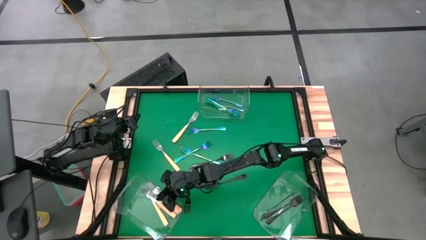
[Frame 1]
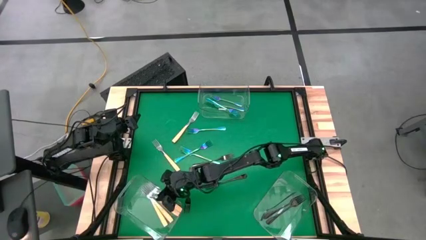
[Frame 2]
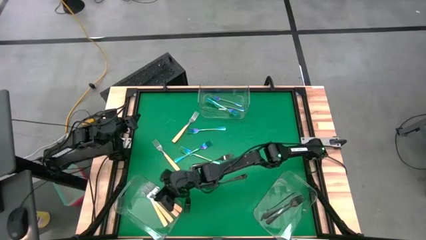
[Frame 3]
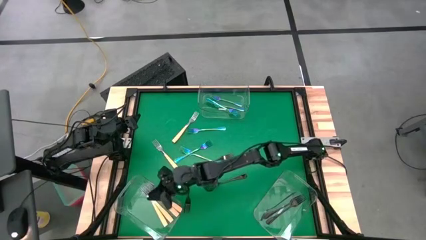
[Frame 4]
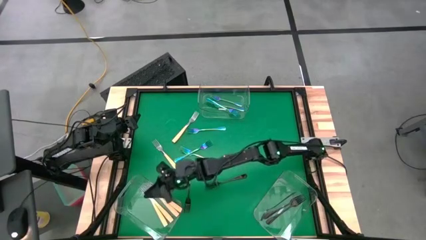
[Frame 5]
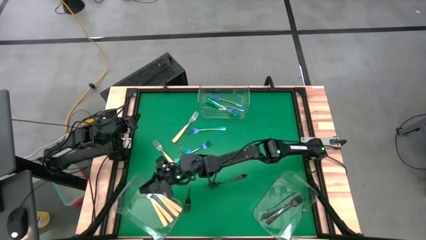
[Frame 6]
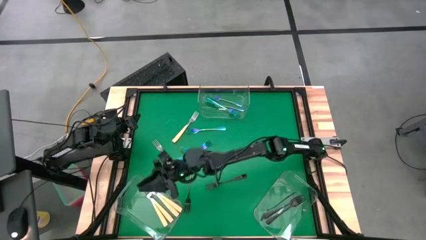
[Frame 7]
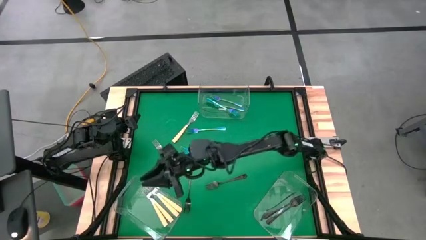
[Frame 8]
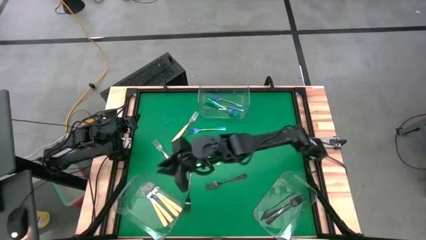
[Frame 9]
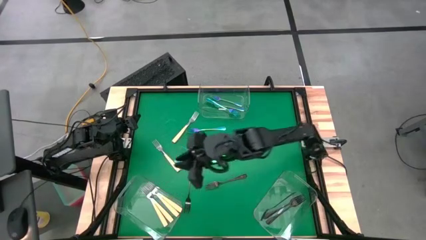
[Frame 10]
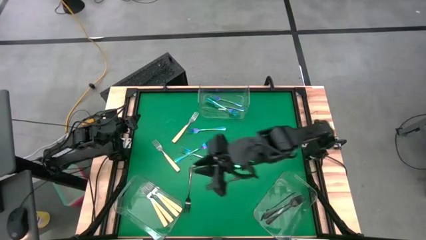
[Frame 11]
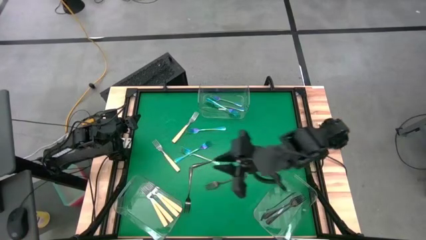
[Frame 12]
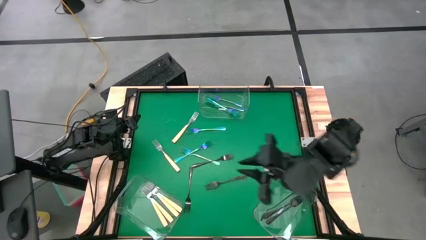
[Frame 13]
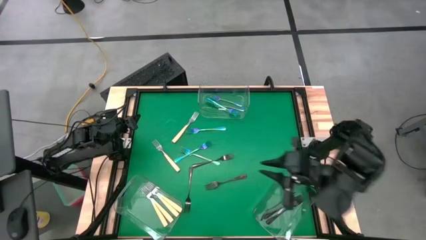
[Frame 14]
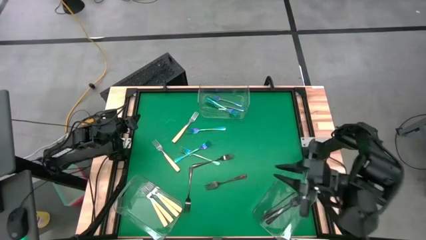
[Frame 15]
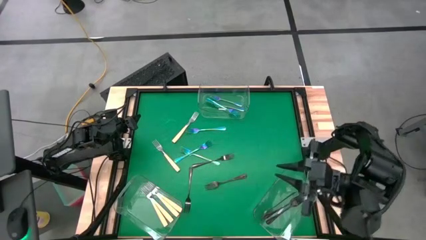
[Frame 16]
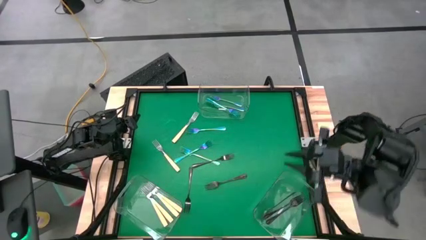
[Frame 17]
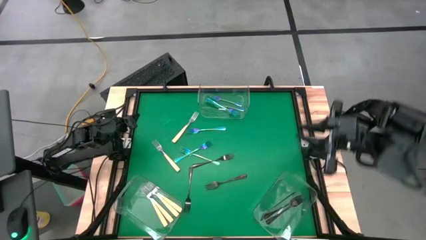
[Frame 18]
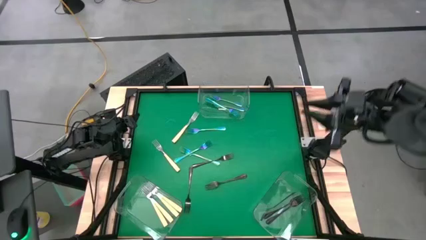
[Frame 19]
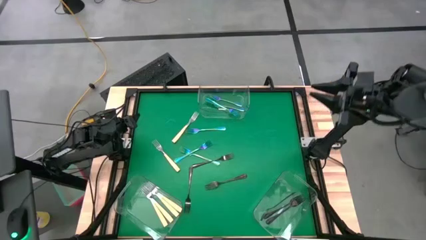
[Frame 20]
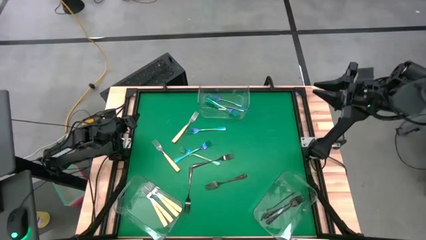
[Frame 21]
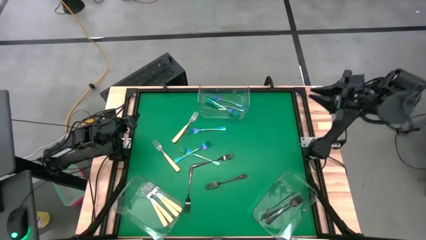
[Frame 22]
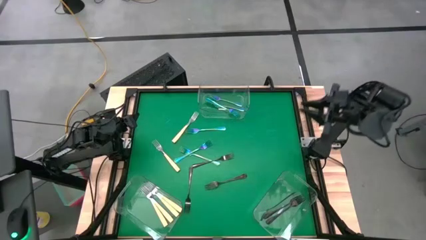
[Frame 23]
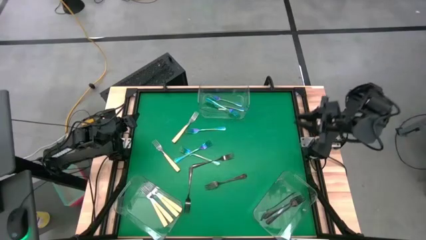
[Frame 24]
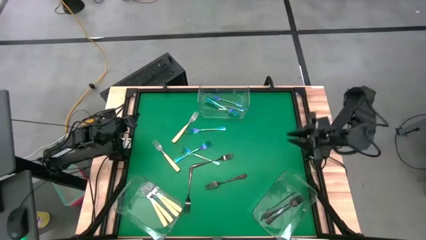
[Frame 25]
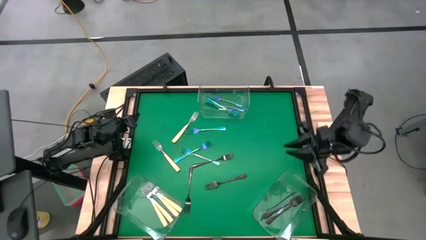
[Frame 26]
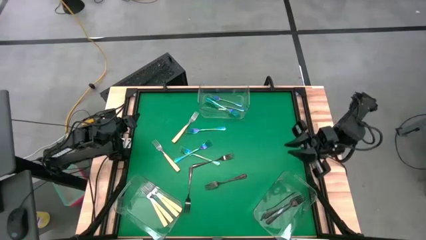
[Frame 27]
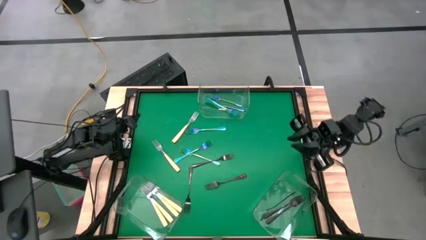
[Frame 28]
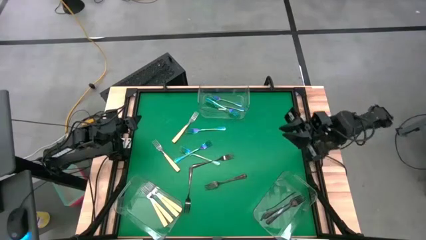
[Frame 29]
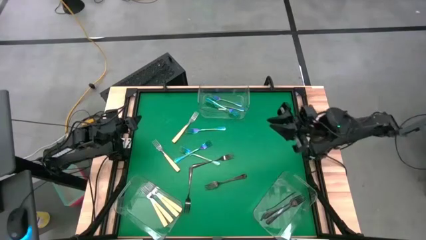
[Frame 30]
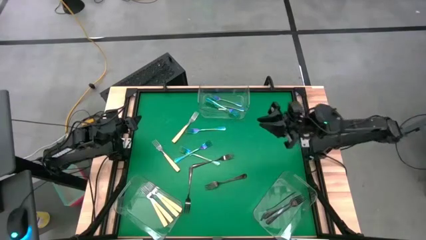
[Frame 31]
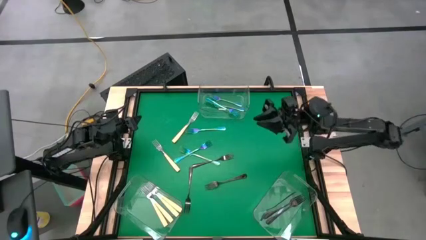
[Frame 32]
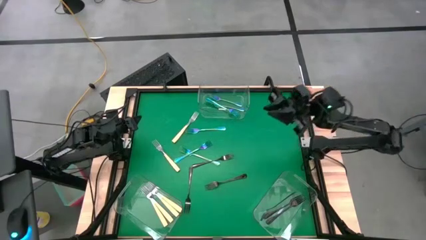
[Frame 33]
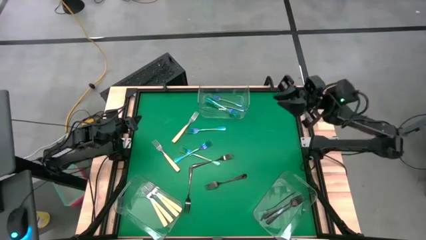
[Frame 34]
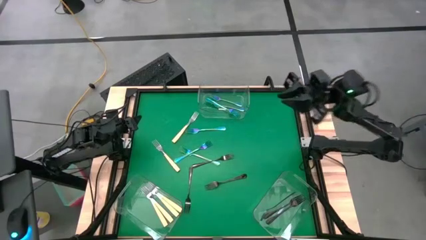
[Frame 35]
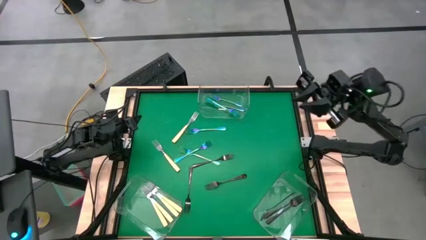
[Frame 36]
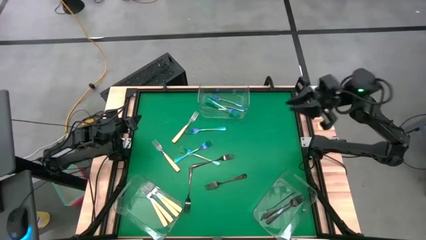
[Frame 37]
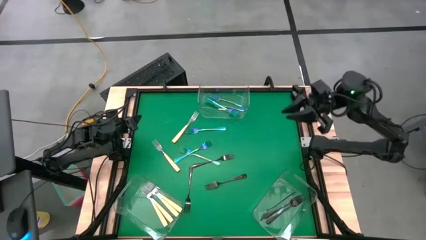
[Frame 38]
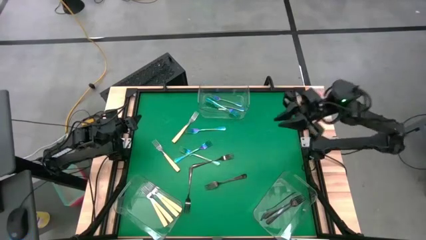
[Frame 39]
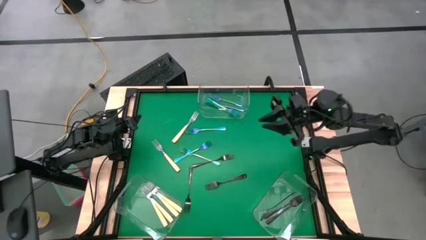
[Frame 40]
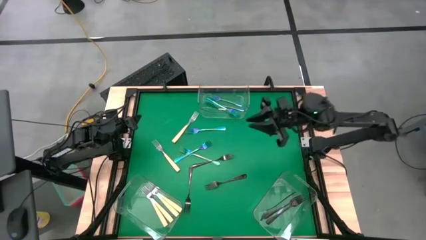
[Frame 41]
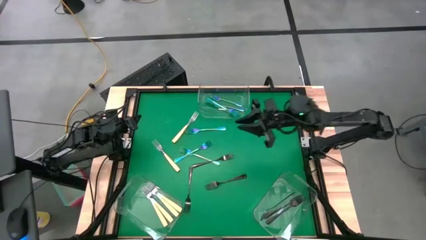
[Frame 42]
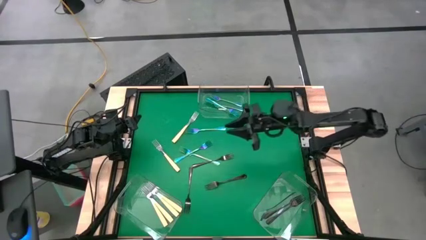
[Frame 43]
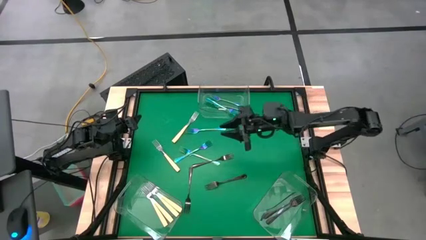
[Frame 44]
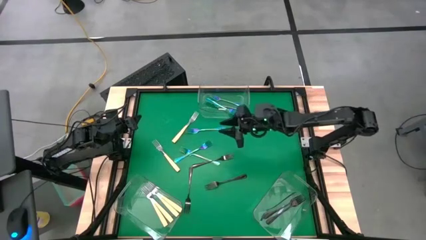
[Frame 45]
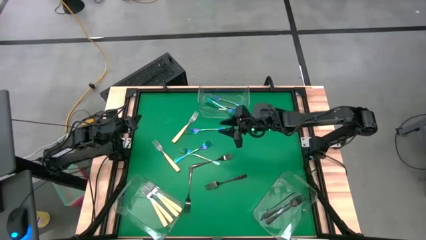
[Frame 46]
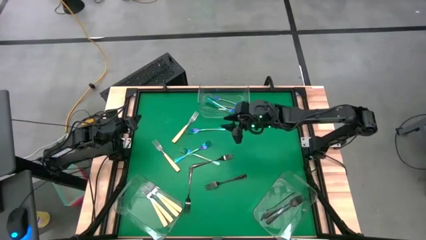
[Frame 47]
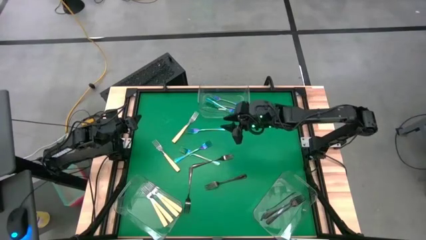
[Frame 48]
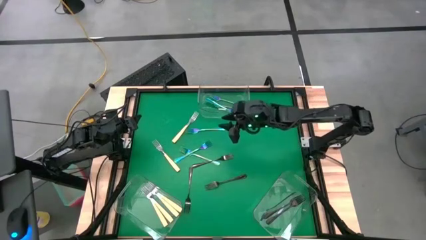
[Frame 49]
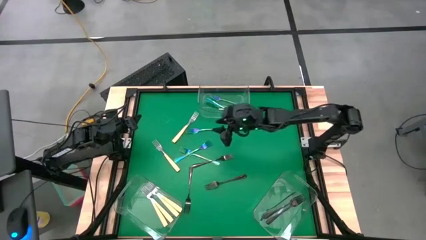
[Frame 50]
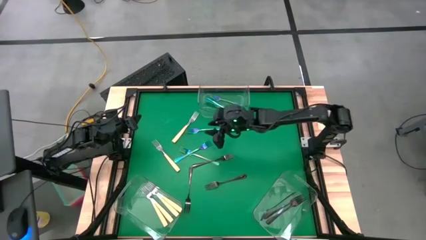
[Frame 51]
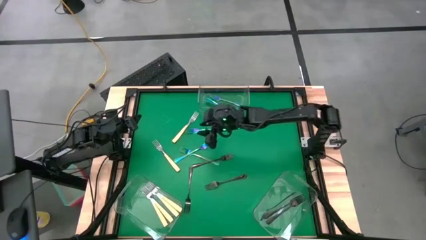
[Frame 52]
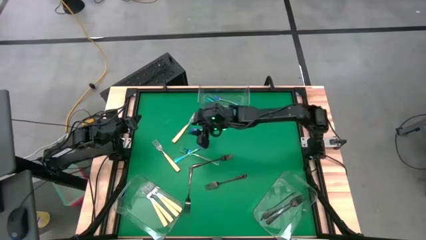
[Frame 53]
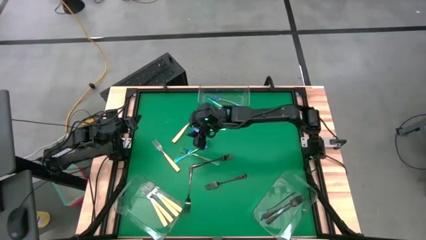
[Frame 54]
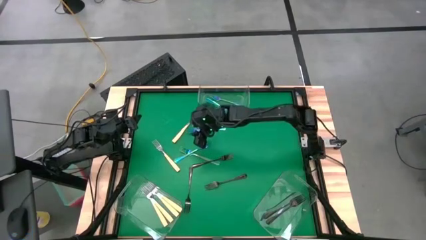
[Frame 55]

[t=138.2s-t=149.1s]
Task: Sort silverware by color (type)
Put the blue fork into the top transparent bin

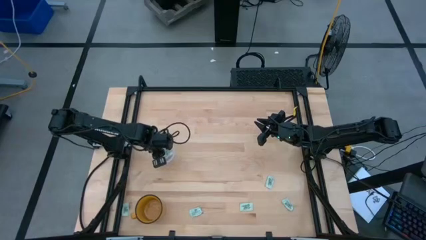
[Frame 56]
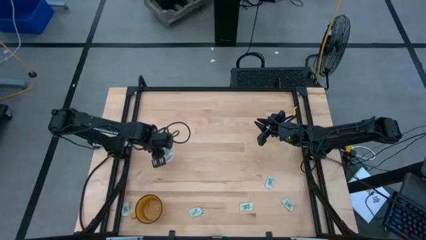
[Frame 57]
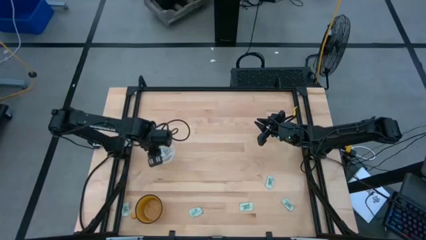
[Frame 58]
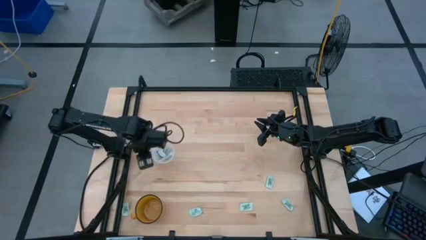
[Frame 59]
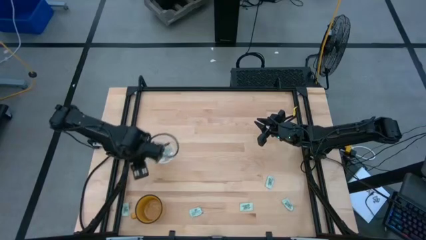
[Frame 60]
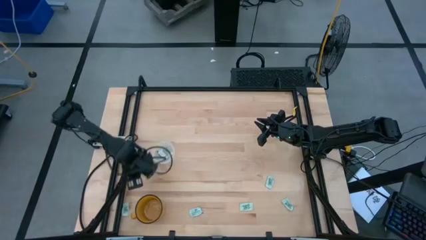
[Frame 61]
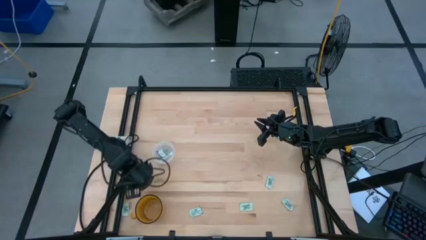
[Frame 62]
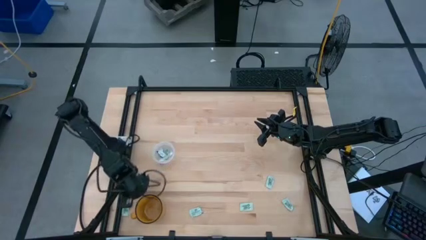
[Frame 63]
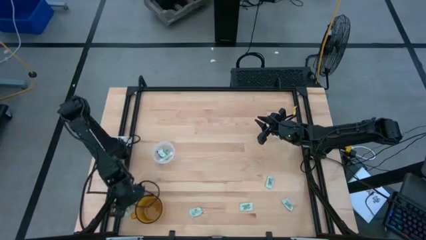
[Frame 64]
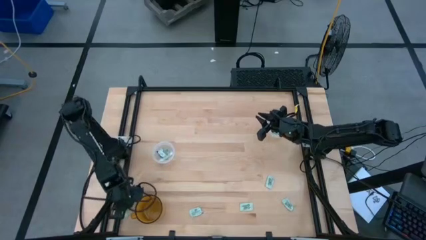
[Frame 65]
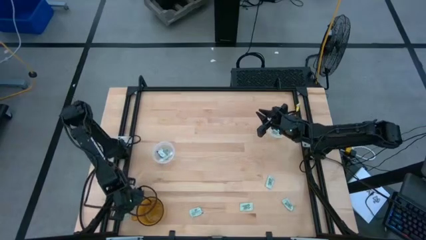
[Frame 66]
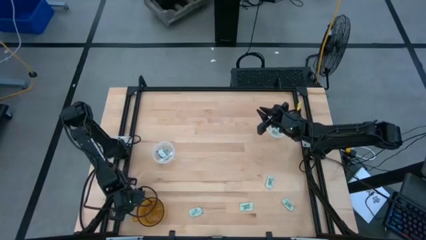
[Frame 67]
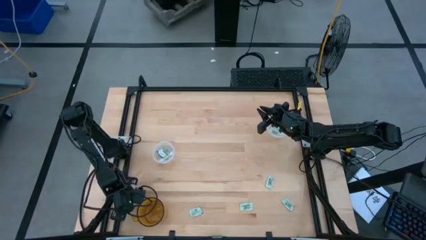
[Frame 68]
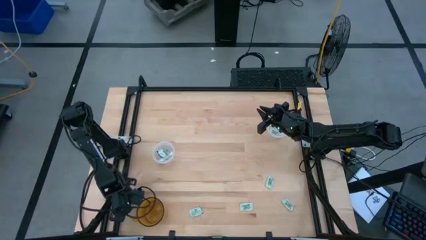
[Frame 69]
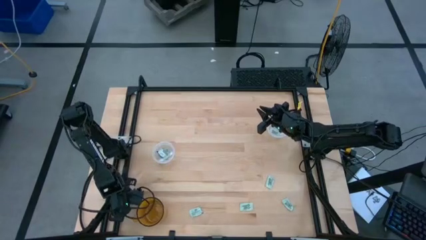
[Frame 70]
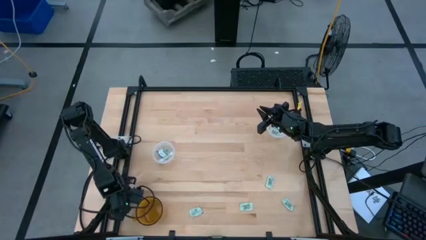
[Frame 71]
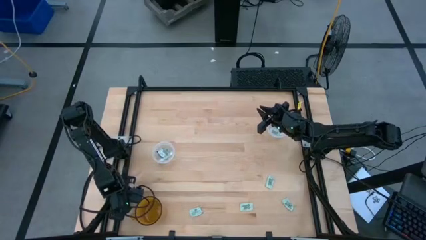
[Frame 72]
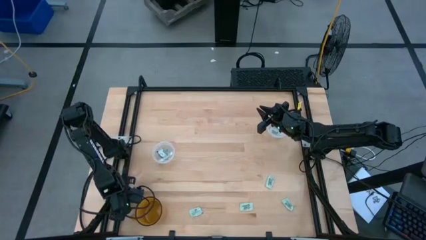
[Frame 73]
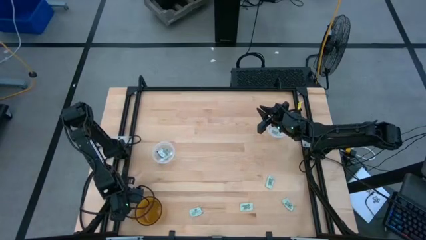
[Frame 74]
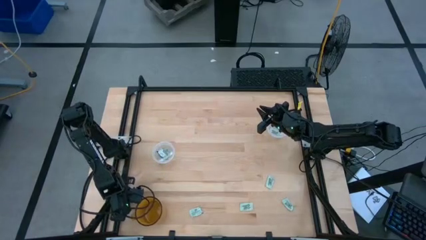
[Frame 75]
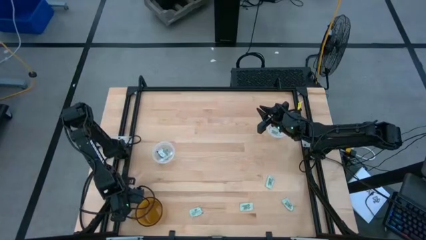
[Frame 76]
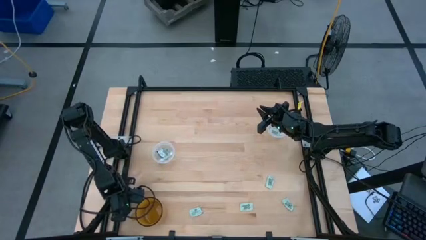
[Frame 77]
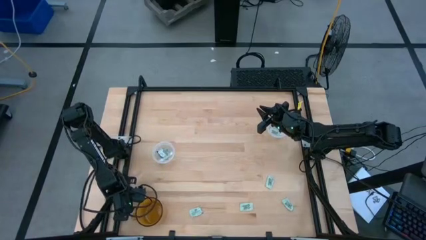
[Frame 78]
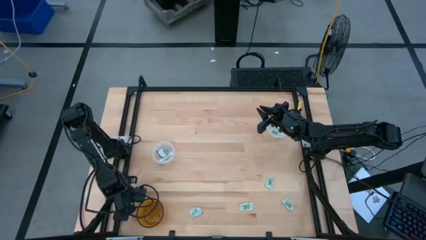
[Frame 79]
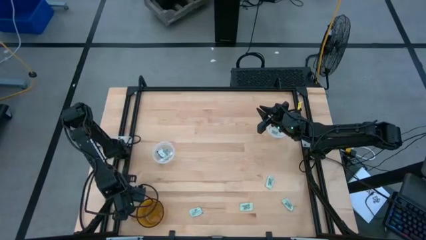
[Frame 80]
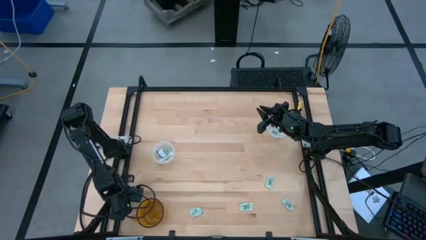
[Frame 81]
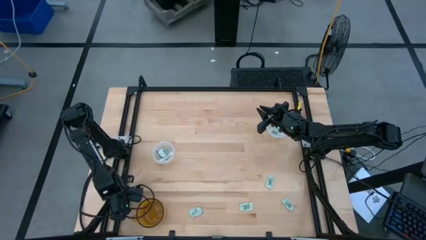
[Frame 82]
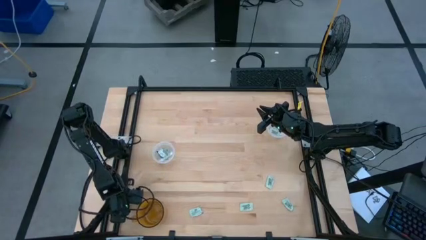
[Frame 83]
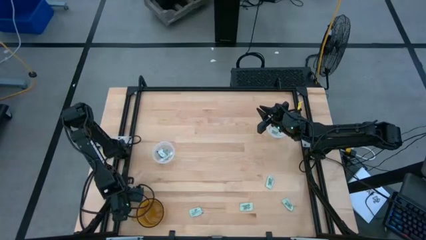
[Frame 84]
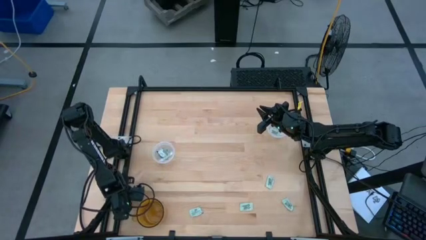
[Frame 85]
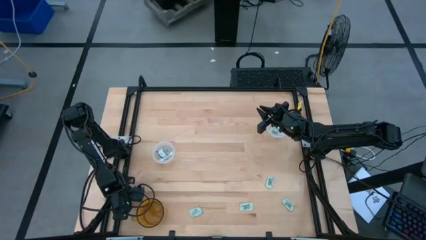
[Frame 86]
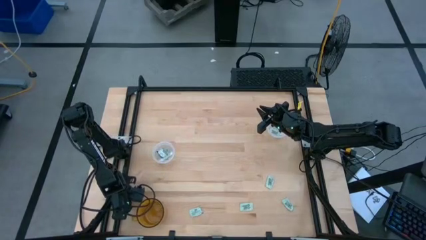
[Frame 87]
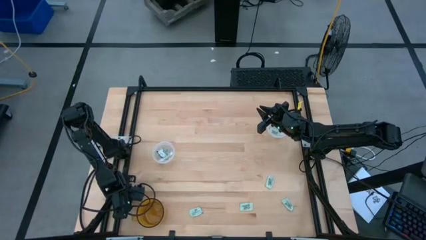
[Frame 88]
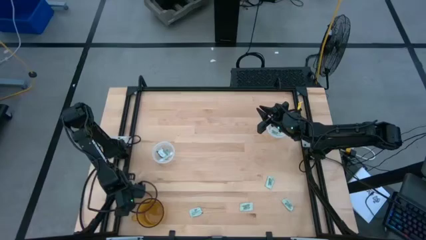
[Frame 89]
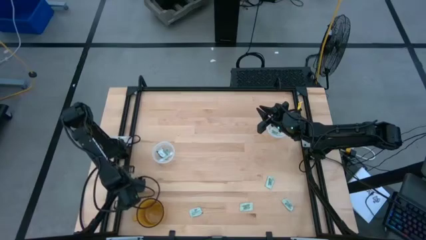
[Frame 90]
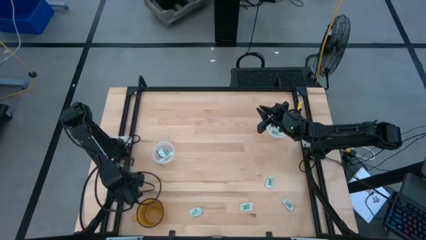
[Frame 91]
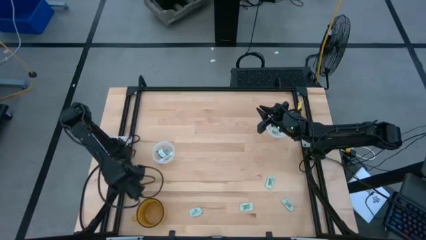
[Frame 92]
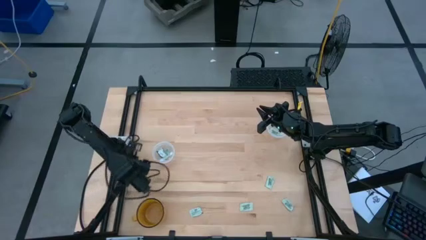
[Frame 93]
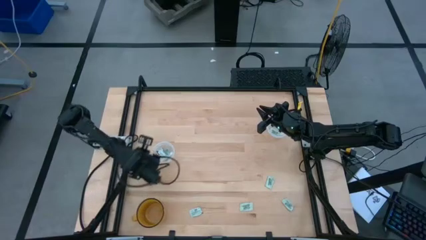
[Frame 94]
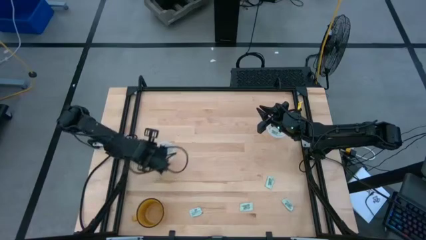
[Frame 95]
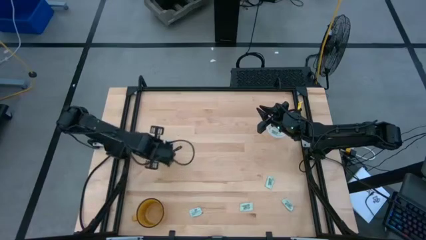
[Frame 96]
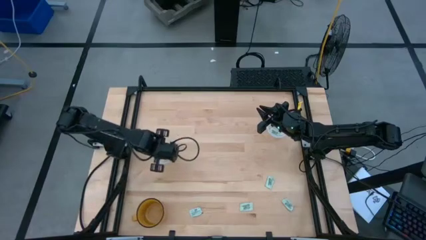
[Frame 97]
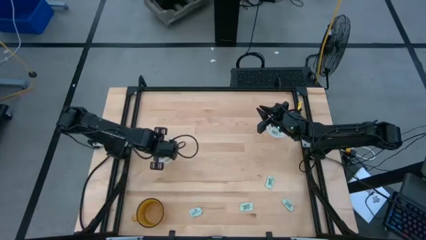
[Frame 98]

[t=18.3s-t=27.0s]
Task: Pick and place items into bin
Put the green stevia packet into the left transparent bin
